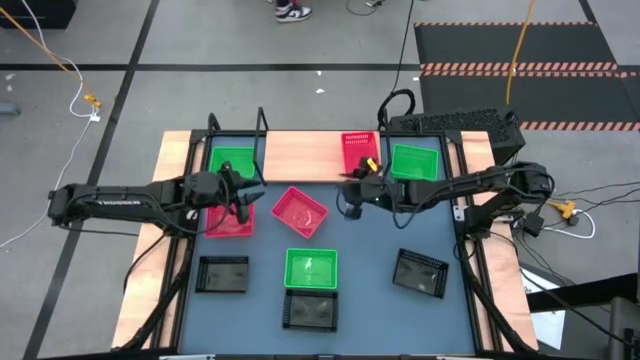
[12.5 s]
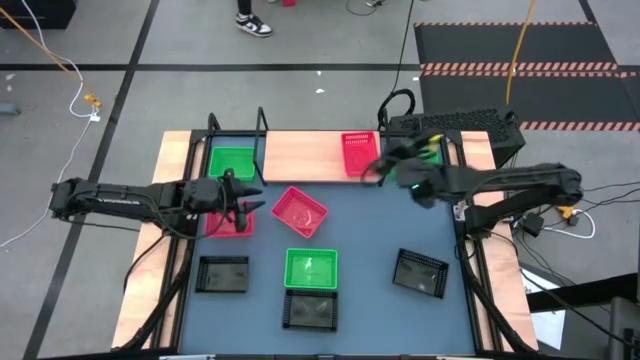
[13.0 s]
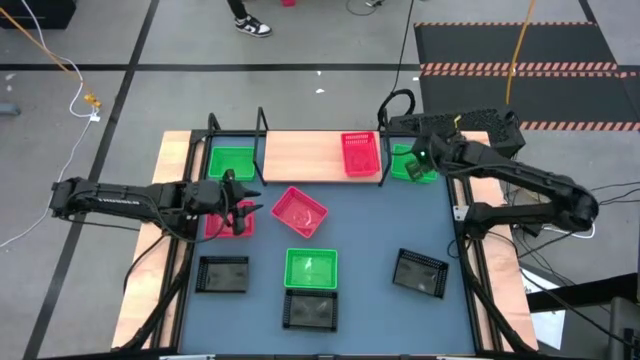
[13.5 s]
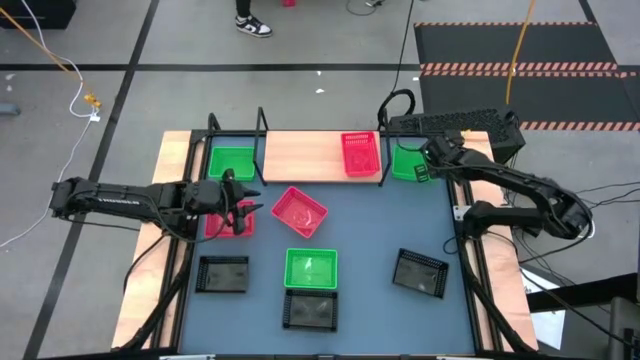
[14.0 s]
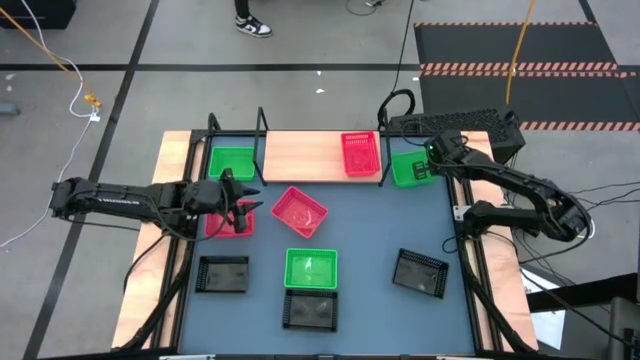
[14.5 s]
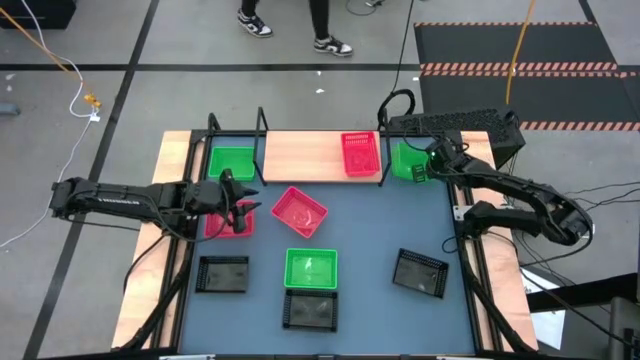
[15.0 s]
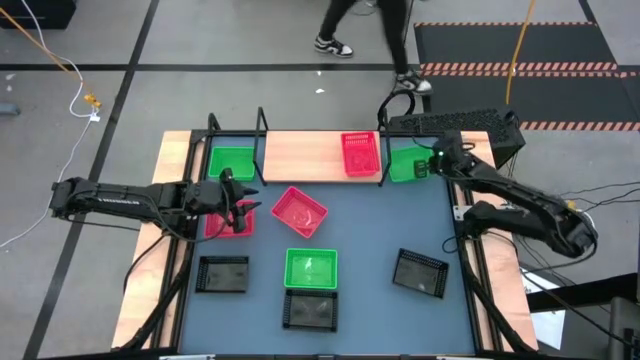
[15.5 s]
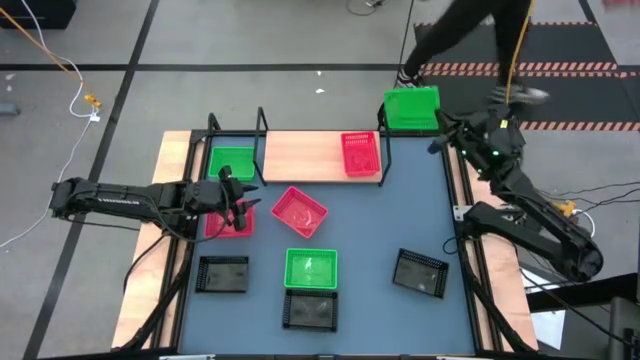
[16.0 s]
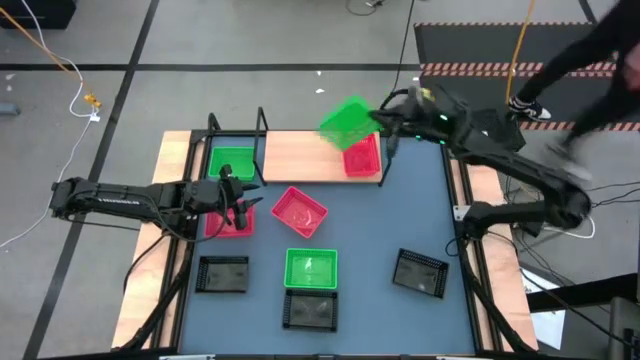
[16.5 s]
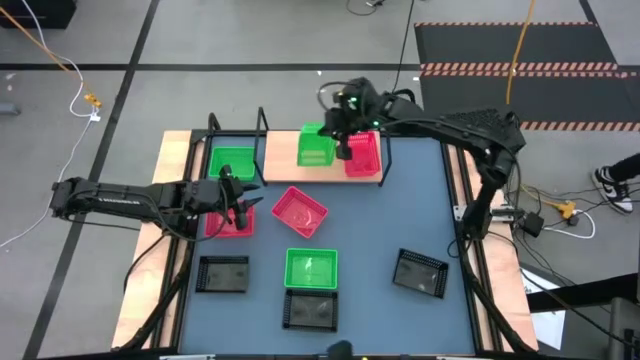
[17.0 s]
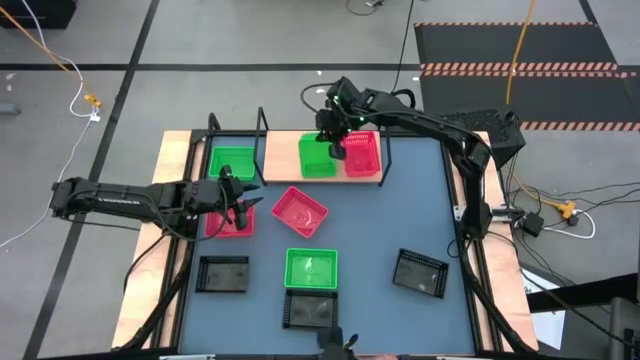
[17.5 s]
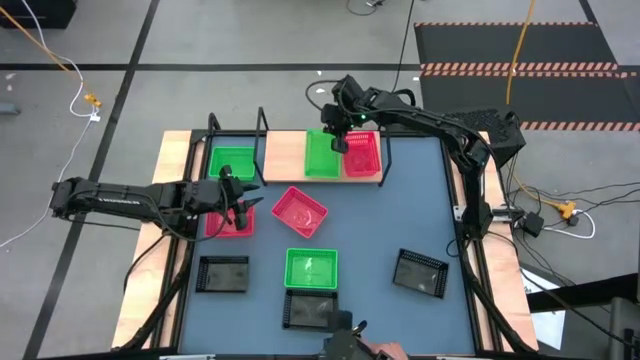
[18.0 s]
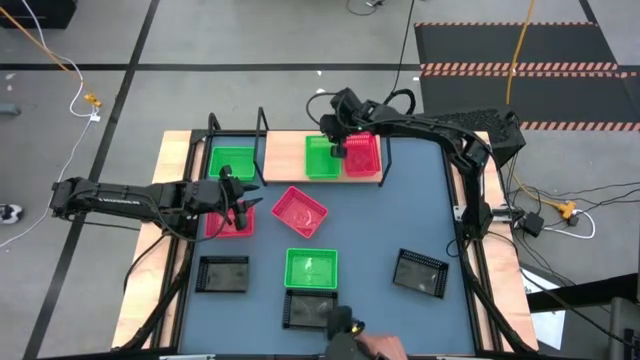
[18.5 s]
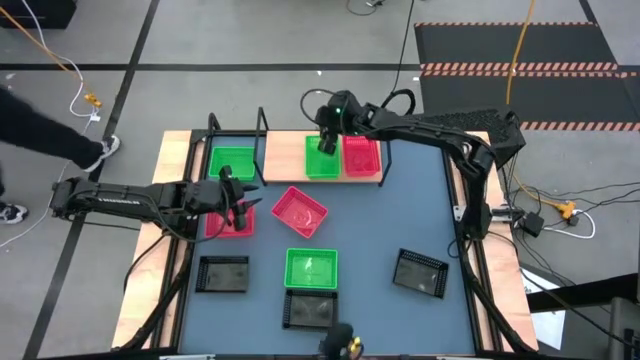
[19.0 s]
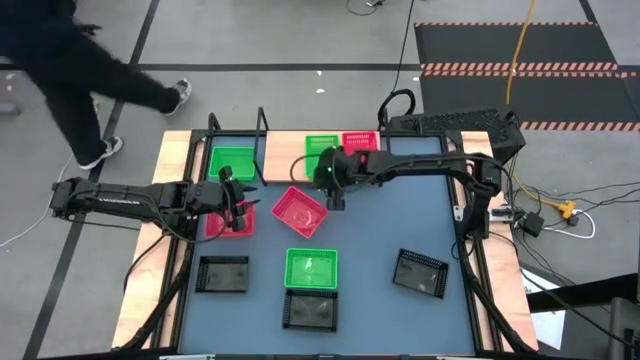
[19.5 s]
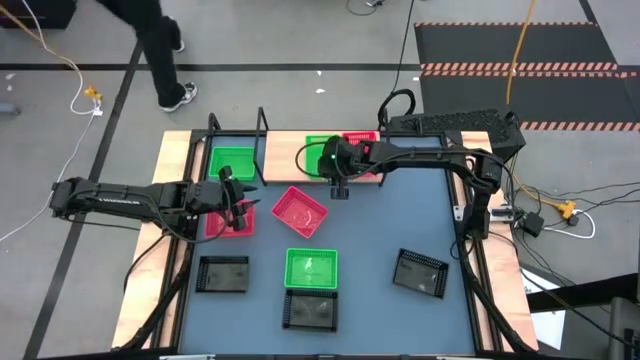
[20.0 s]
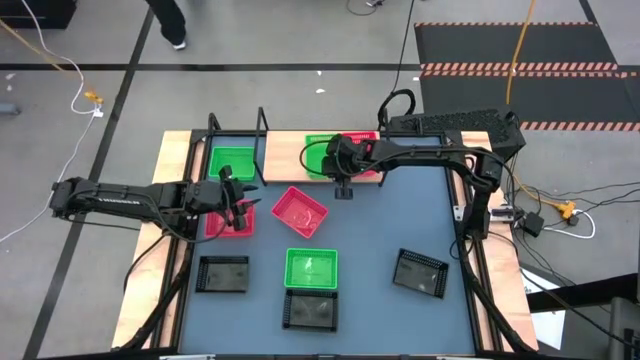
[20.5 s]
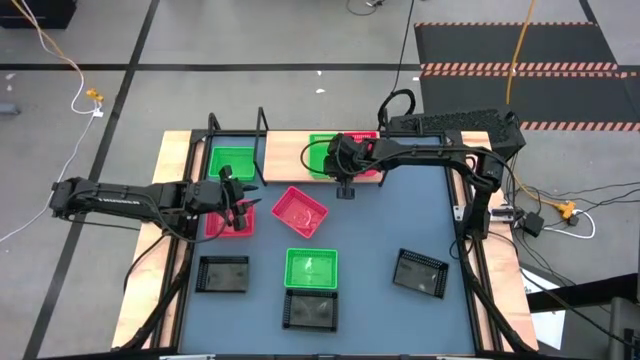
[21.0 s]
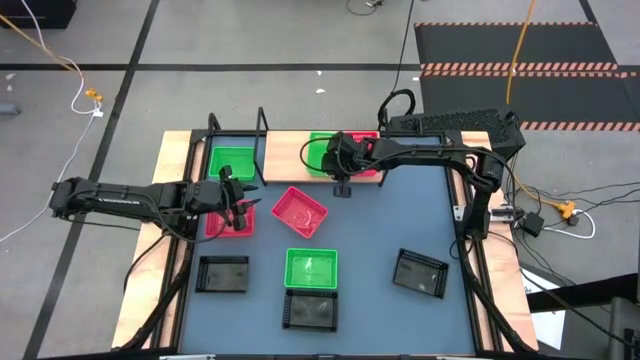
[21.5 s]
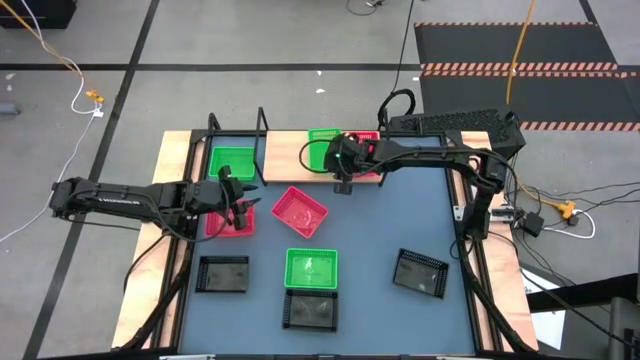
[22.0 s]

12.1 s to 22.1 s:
Task: Stack baskets on shelf by color
Put the top right green bin on the shelf

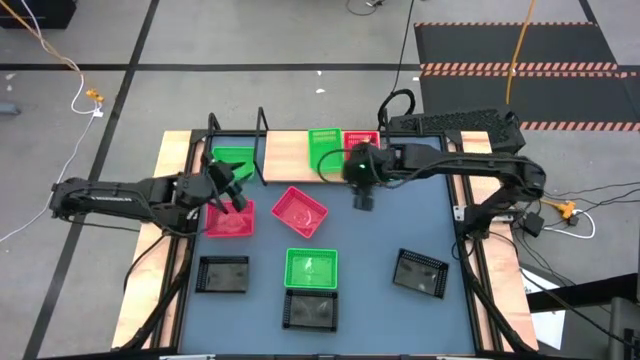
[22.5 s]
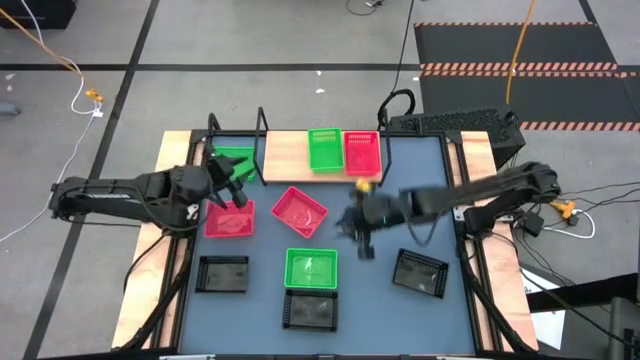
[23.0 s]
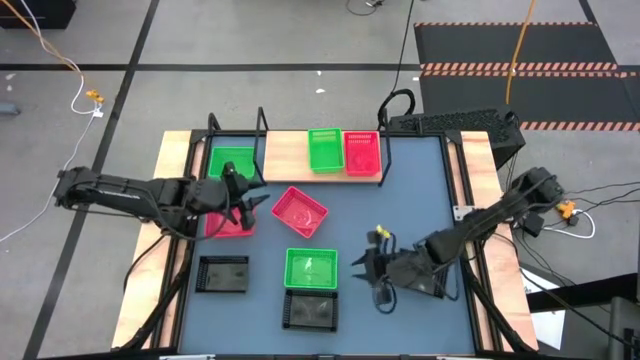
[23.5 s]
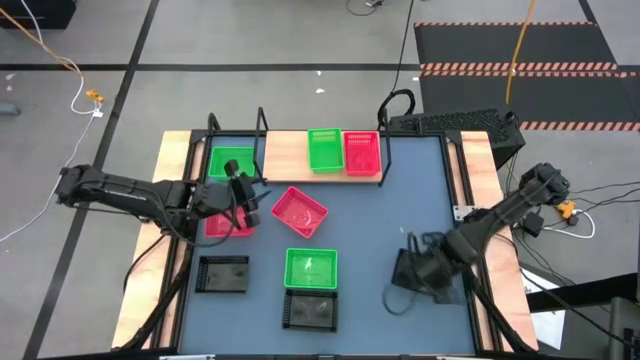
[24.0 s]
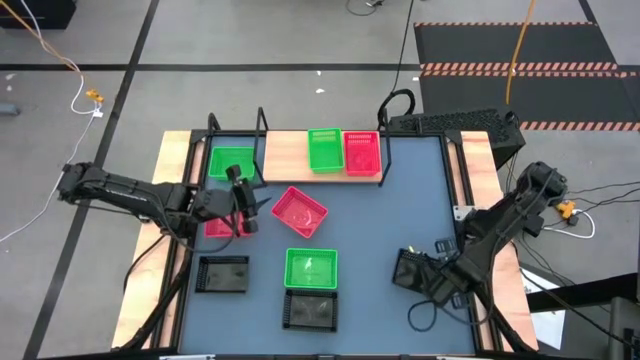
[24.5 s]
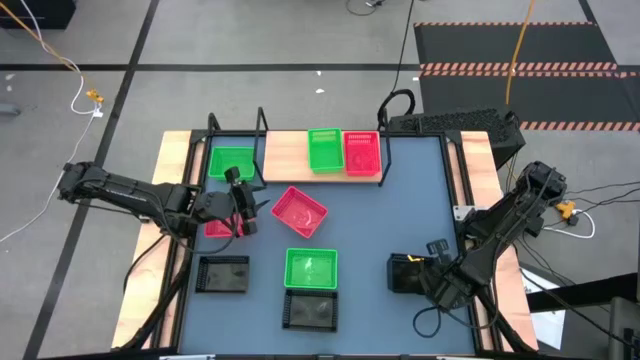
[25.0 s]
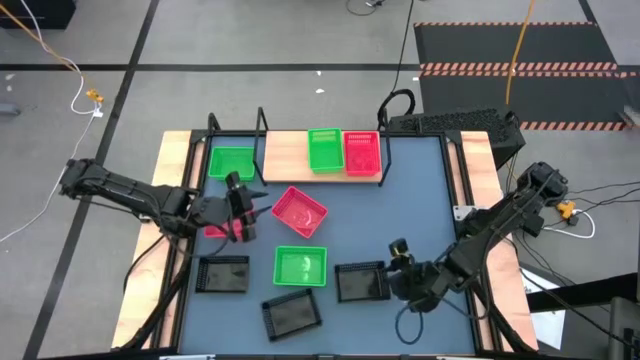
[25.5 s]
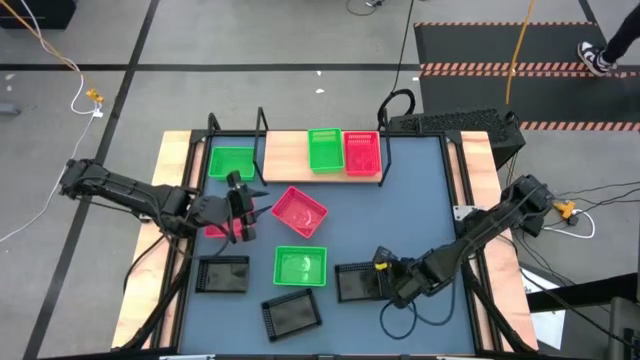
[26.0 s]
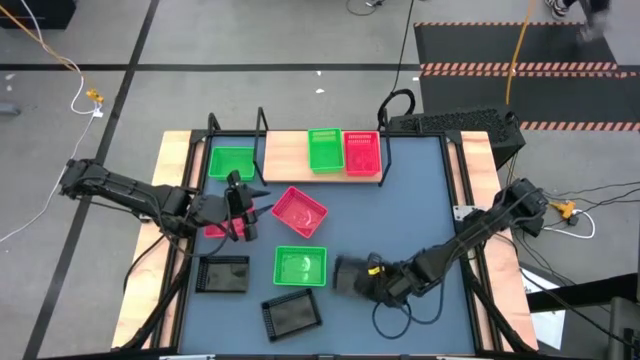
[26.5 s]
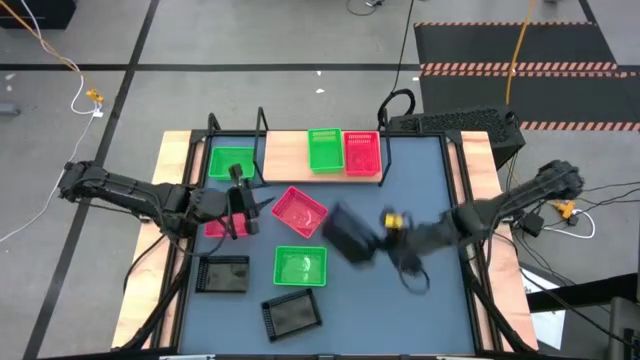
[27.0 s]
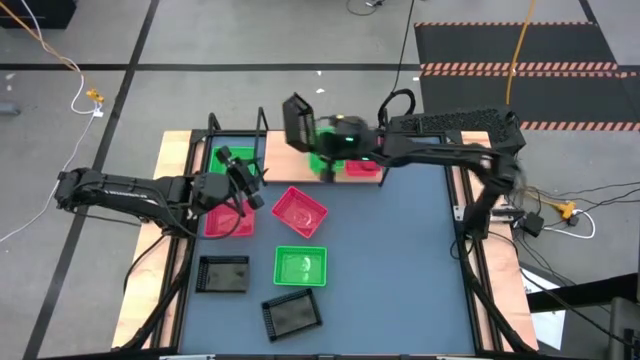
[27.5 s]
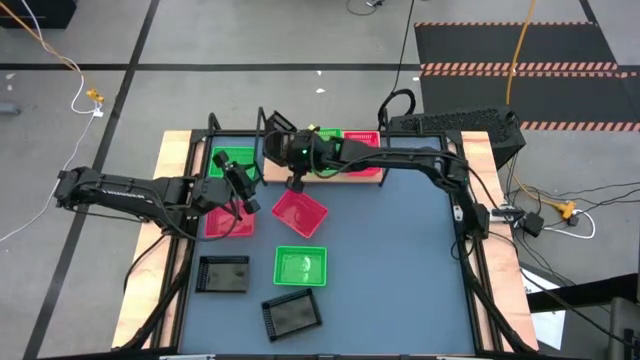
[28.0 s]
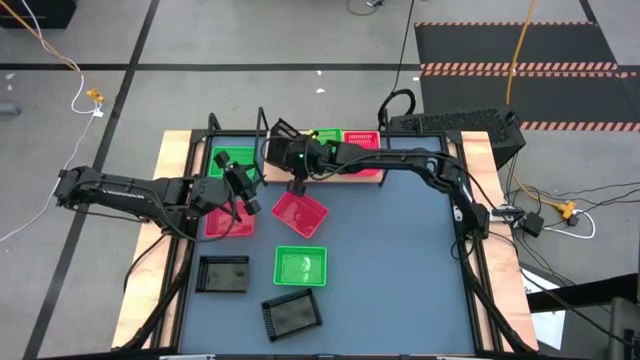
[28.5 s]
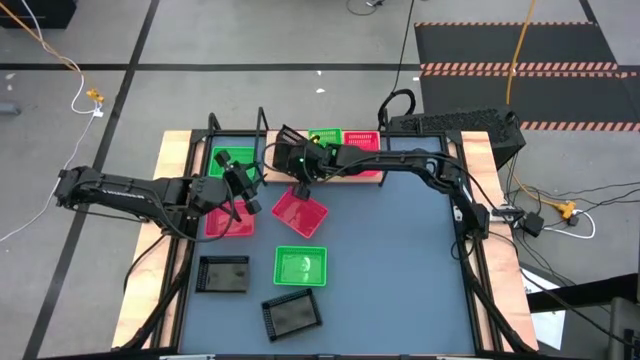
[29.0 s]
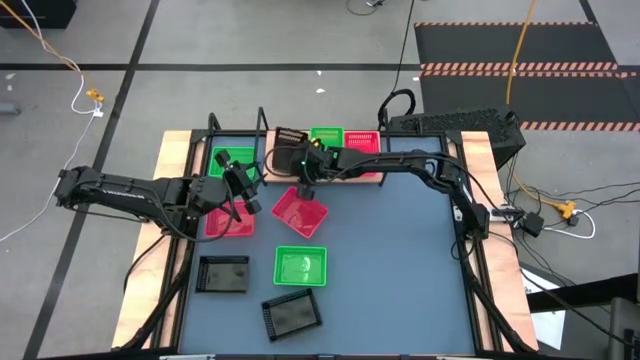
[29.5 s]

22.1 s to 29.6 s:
Put the top right black bin on the shelf

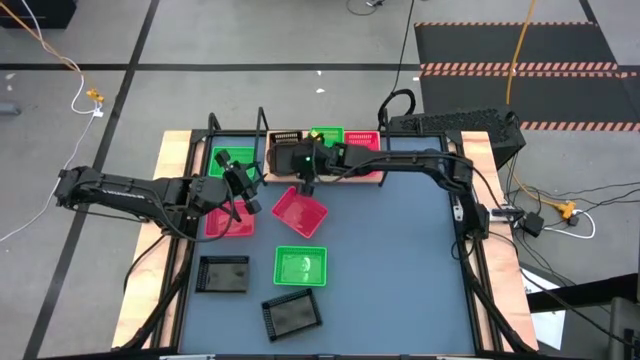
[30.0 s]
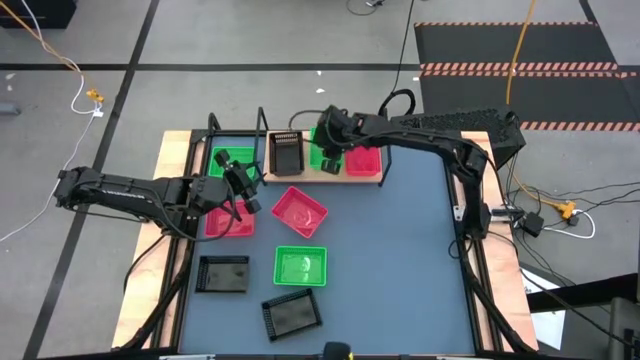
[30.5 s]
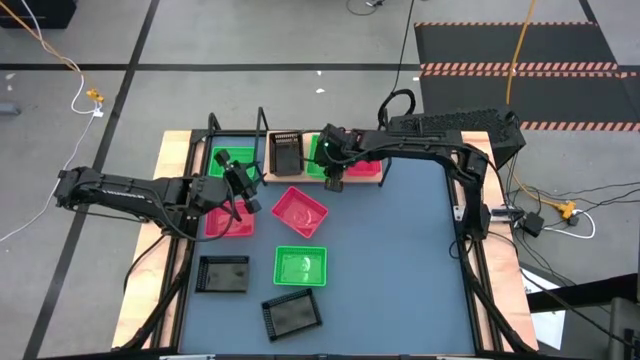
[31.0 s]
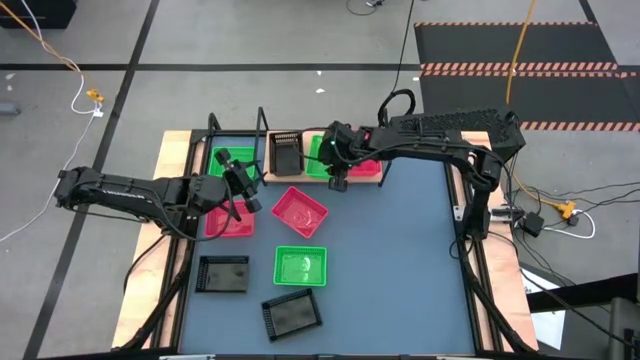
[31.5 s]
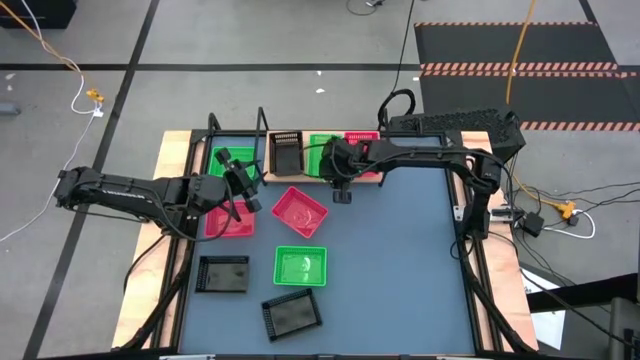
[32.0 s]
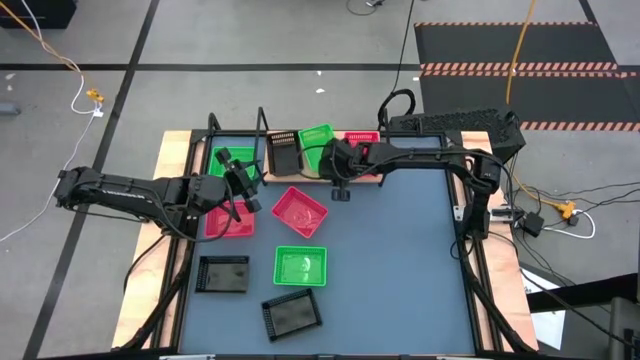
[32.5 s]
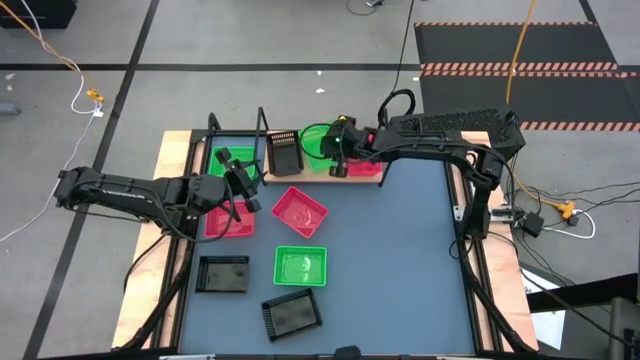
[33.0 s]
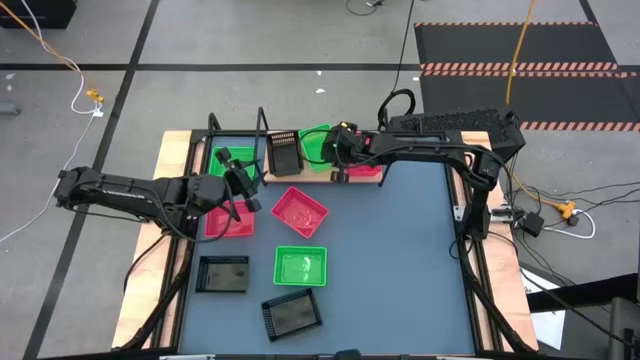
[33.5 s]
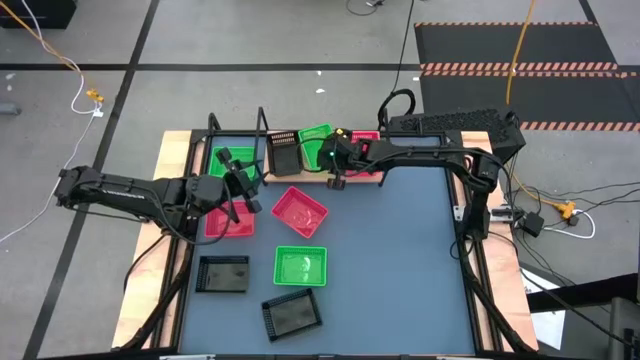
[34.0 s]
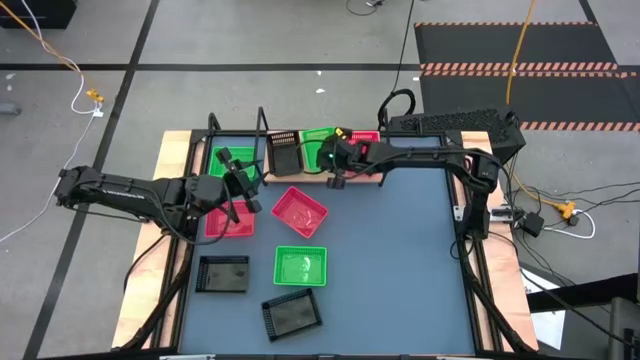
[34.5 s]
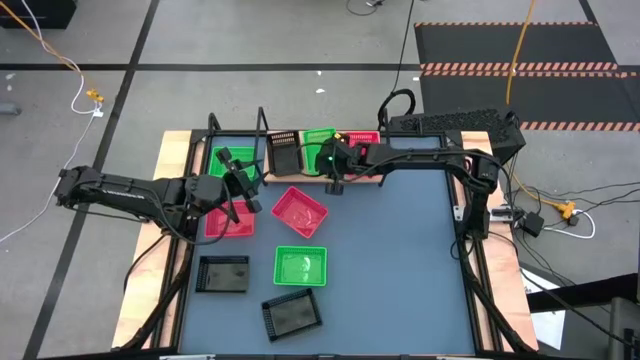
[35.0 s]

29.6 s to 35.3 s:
Adjust the green bin on the shelf
